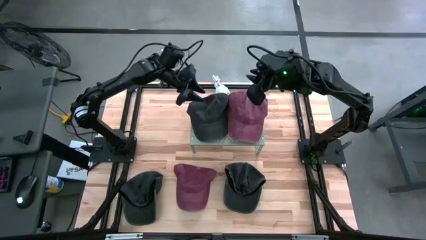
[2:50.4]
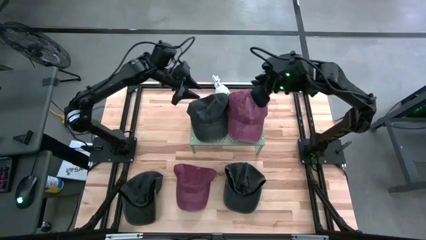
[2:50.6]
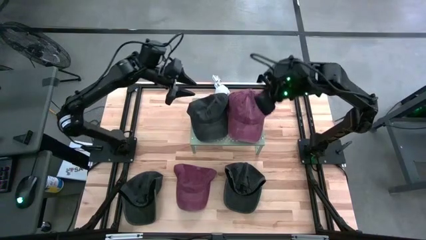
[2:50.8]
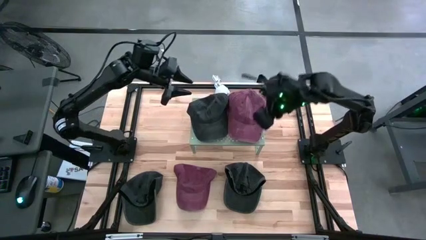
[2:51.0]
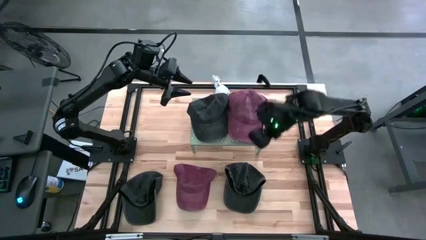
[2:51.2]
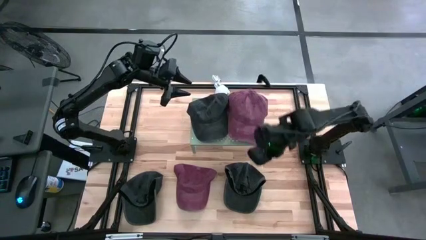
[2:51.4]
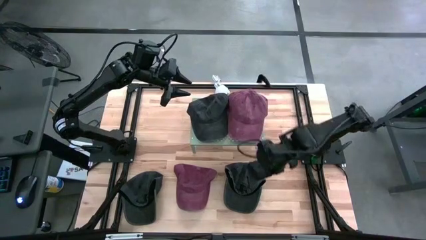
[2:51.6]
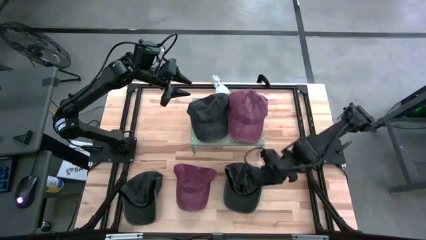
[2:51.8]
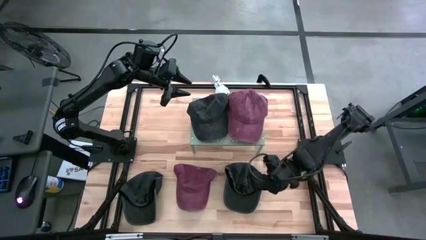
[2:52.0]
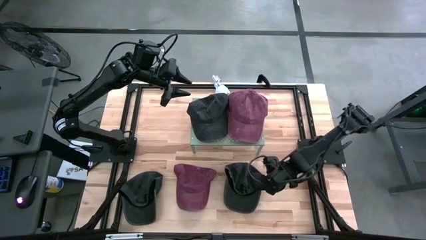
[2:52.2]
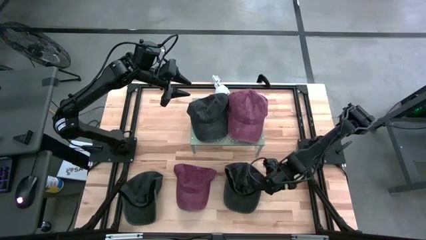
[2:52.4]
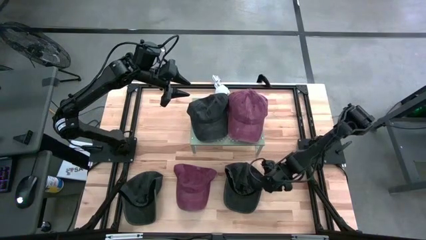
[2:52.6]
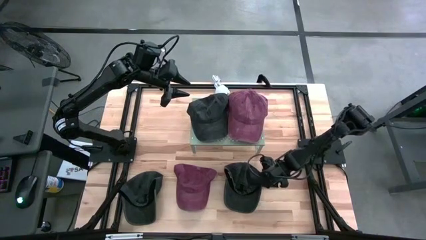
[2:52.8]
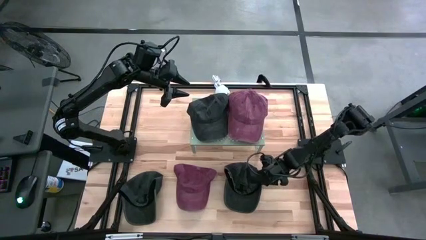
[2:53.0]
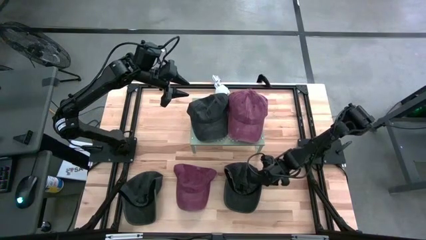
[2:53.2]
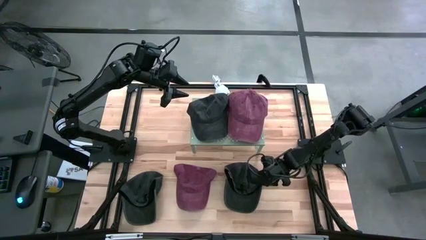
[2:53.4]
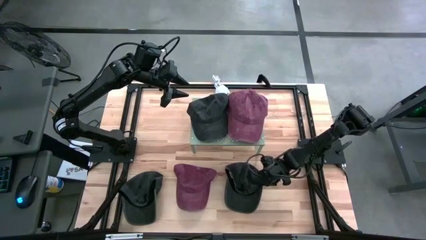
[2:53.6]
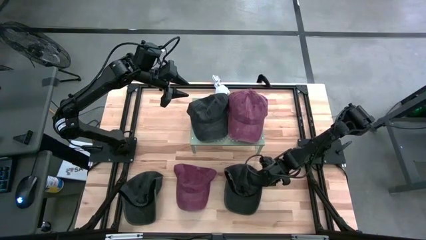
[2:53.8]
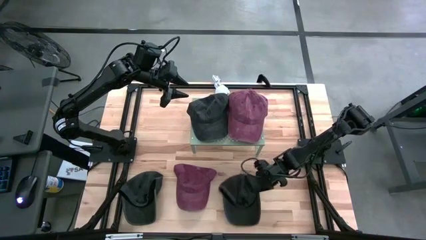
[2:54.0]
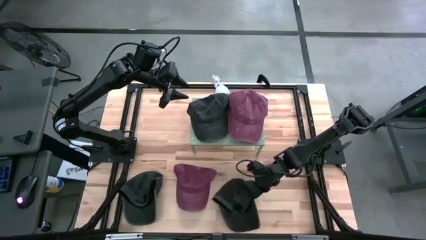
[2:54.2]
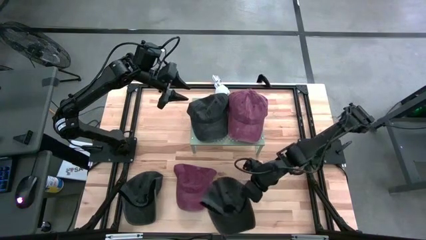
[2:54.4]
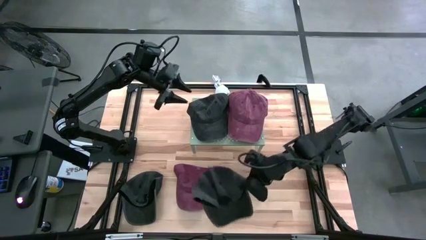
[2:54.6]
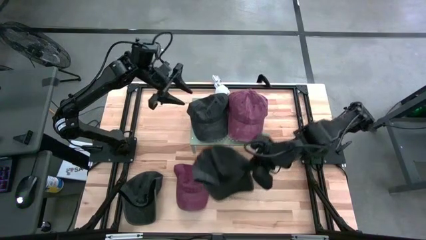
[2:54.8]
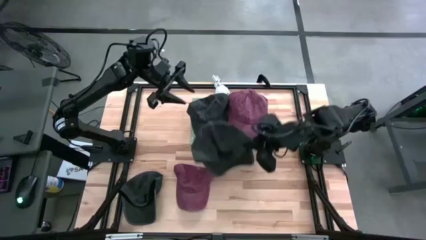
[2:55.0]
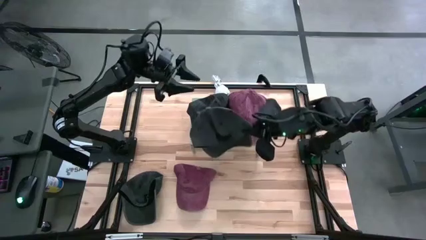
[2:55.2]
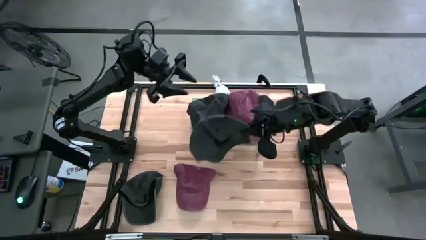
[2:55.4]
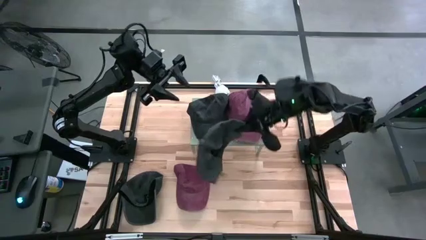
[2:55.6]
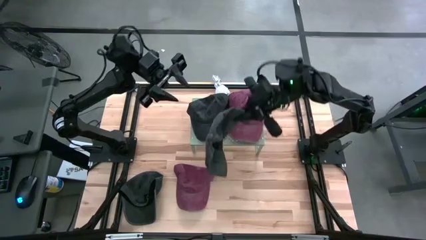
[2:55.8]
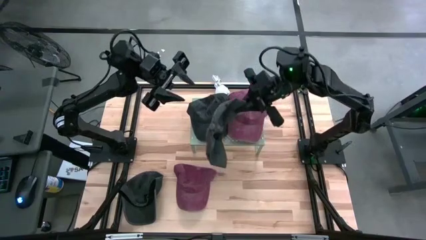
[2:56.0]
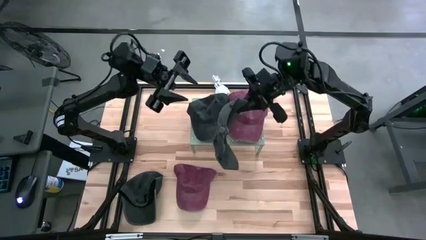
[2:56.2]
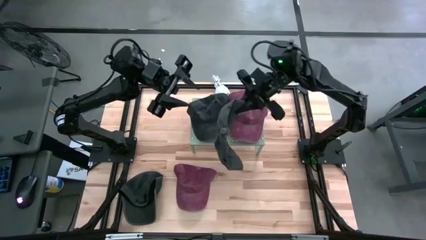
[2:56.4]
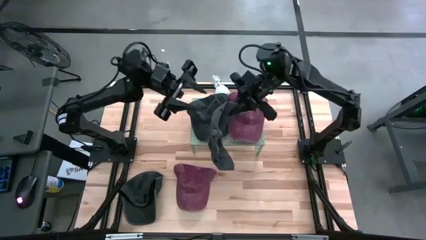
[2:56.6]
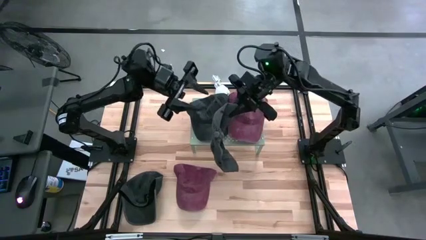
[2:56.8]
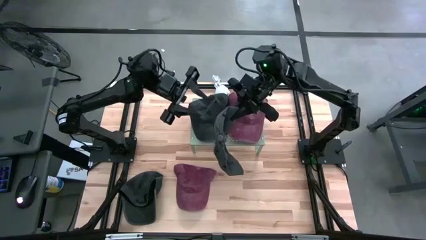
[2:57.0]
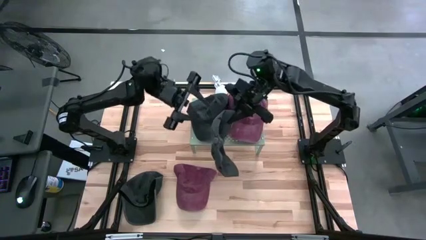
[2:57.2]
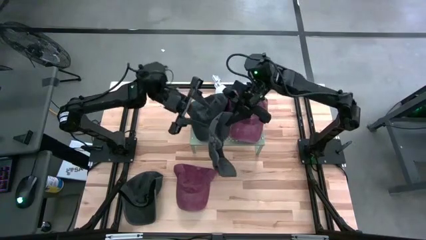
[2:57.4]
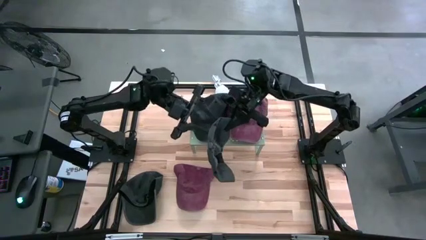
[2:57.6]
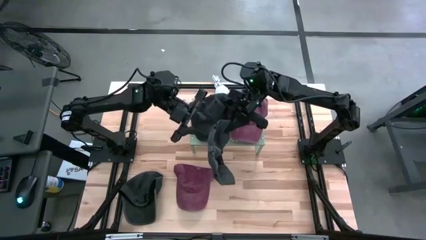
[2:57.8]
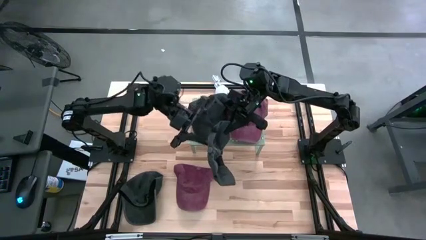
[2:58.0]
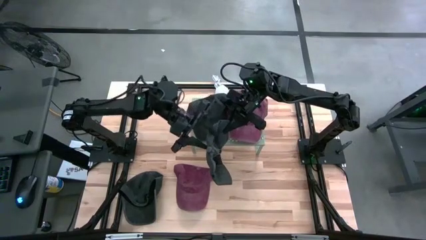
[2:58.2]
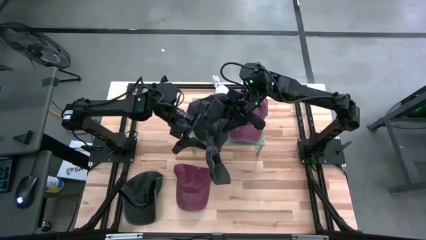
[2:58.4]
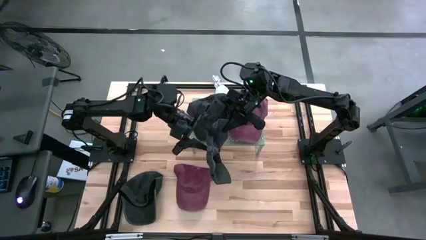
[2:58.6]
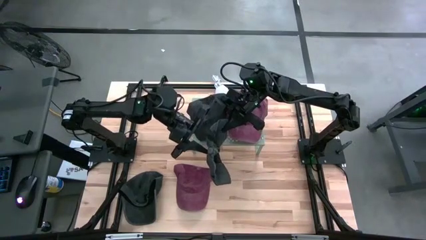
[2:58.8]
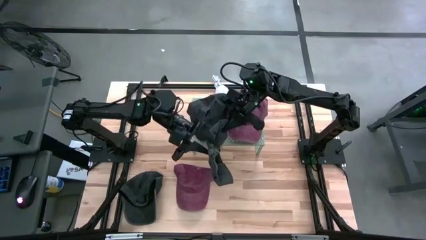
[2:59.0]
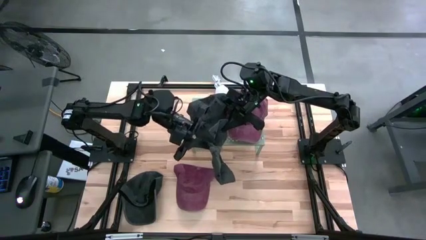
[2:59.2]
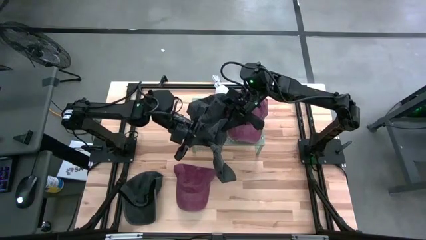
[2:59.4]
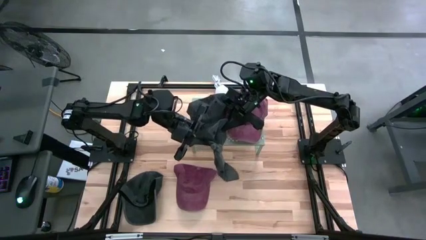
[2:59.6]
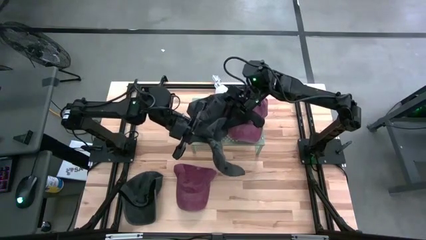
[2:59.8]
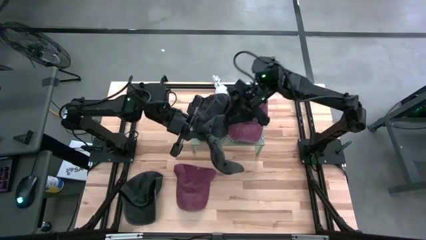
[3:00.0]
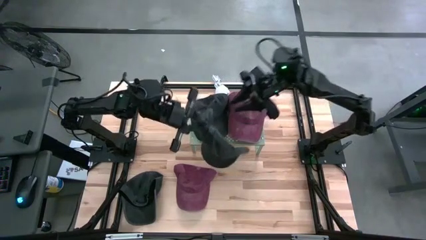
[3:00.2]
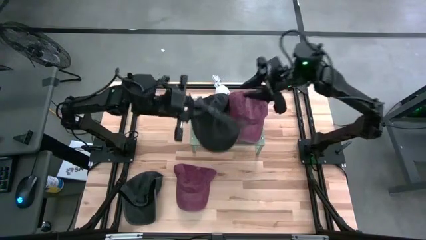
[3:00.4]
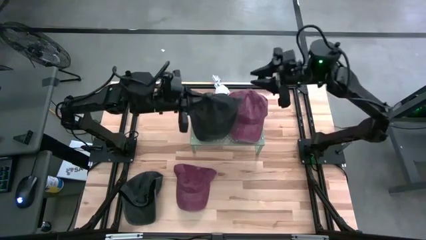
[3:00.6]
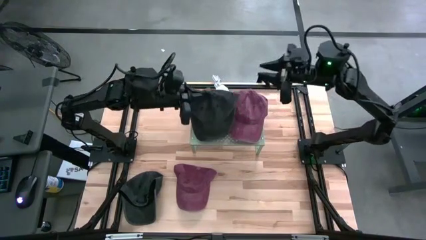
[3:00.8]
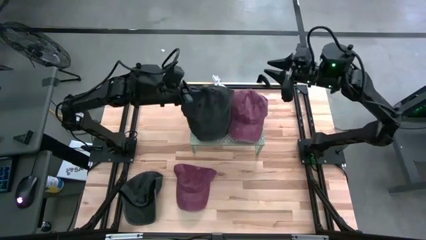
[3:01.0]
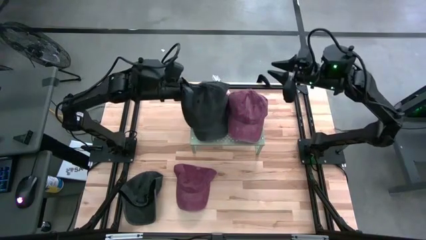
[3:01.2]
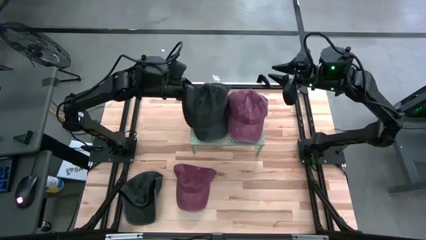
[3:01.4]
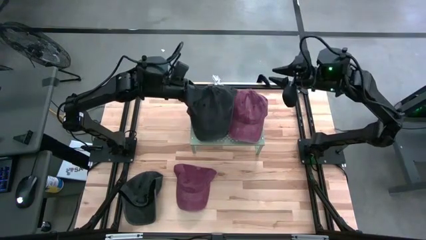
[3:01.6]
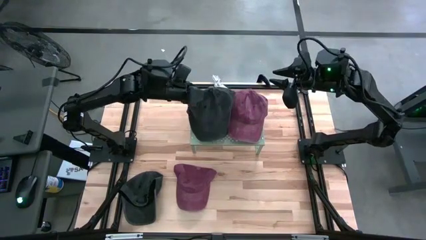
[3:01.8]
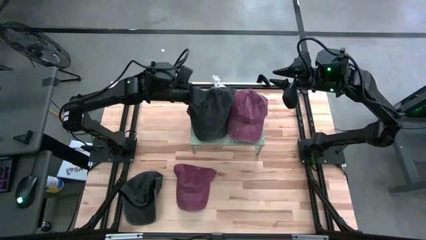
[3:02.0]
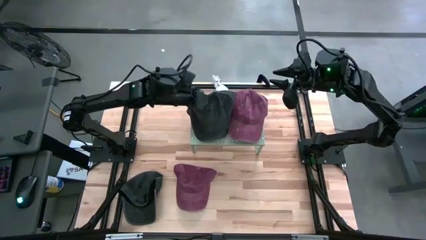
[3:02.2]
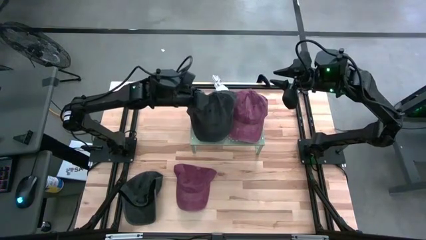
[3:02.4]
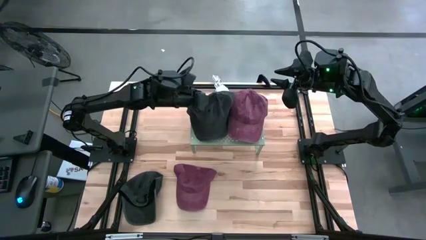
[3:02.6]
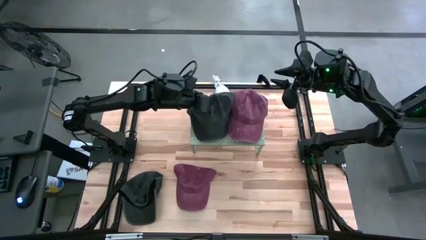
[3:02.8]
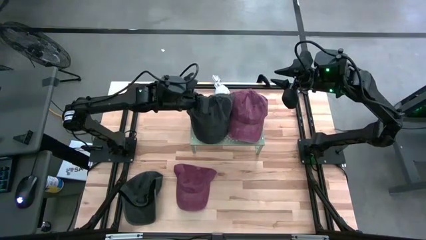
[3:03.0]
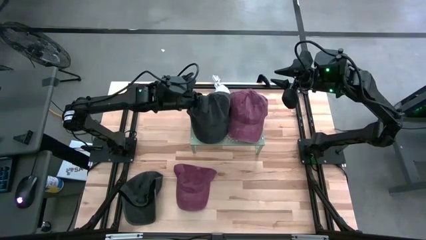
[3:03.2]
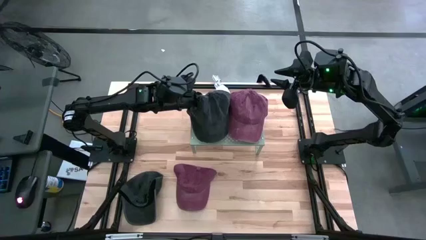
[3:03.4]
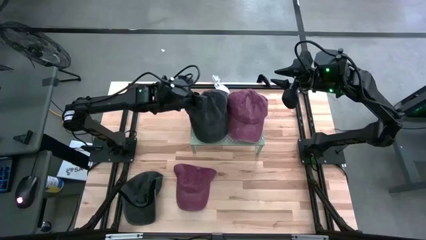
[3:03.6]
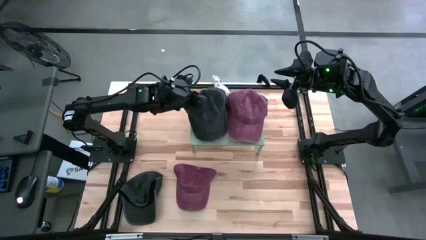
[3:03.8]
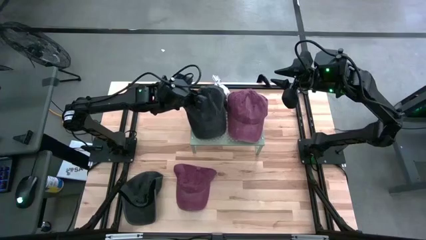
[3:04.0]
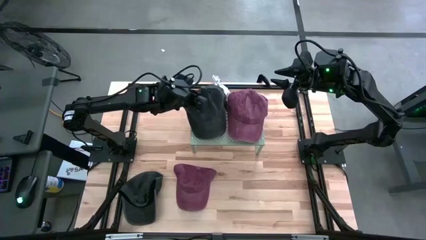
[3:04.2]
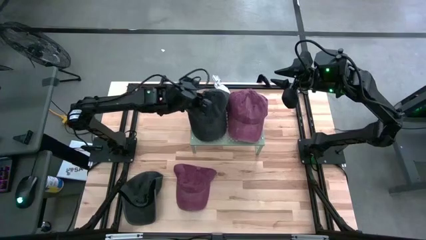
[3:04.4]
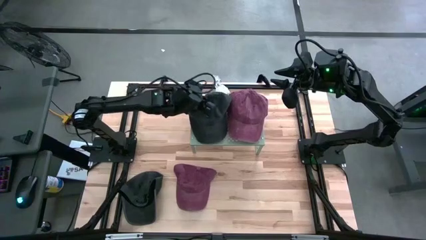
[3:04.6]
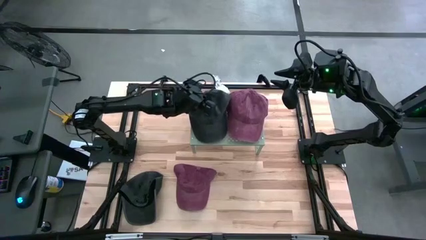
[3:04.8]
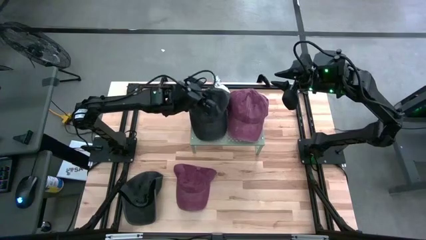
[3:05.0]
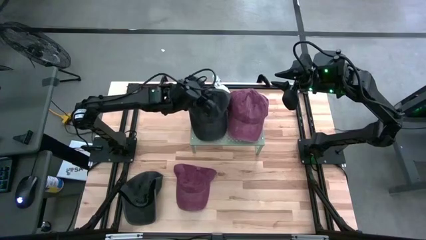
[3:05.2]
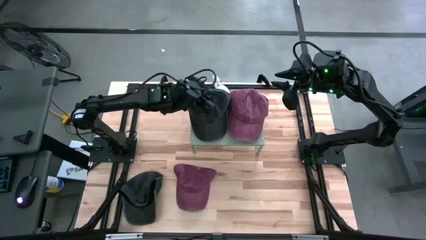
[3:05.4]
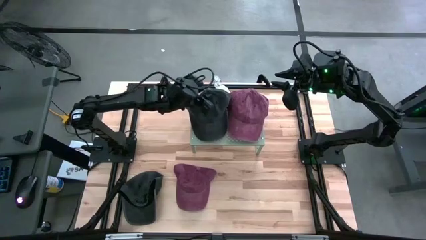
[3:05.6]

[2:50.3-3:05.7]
Task: Pick & Place hat
Stack the right black cap on top of the black cap on the shelf

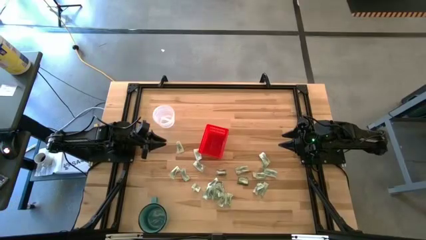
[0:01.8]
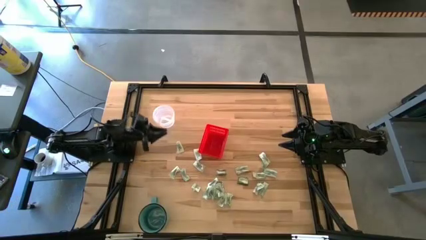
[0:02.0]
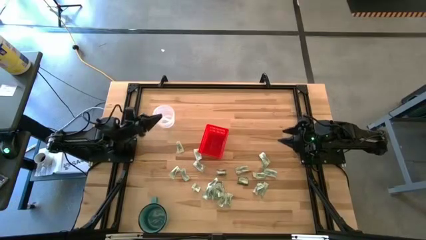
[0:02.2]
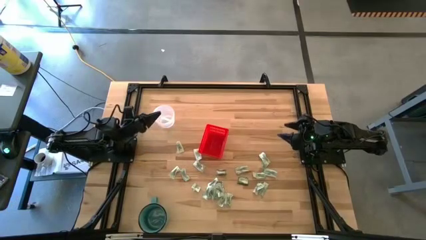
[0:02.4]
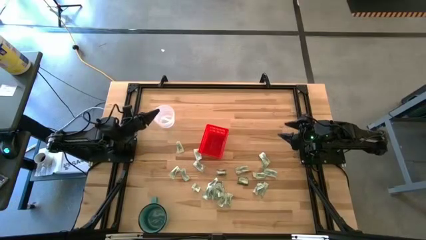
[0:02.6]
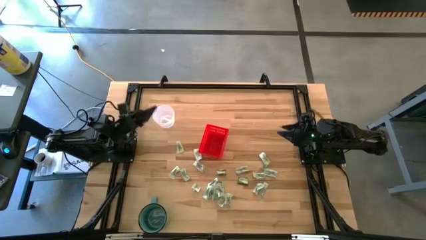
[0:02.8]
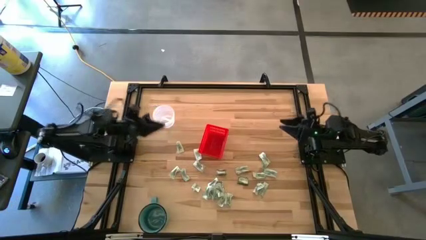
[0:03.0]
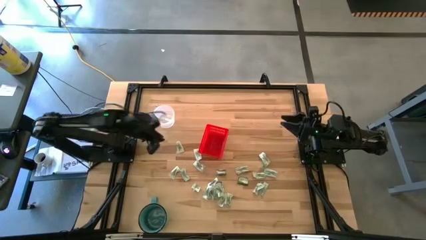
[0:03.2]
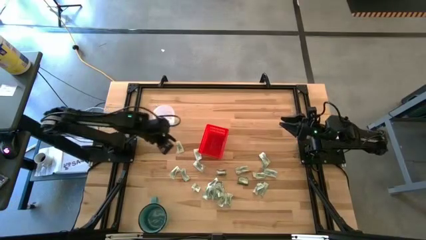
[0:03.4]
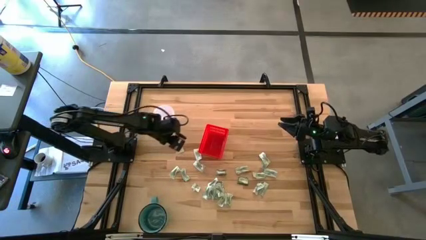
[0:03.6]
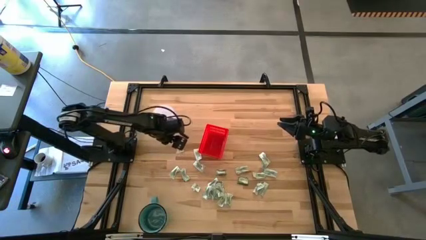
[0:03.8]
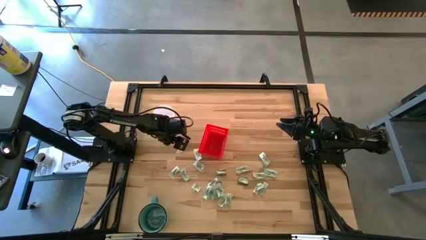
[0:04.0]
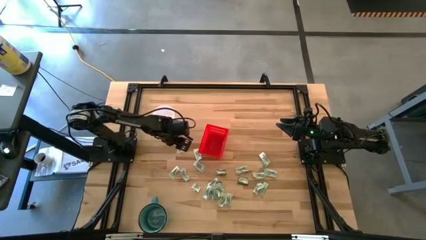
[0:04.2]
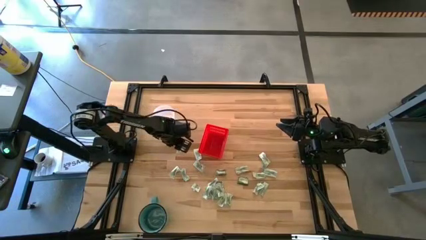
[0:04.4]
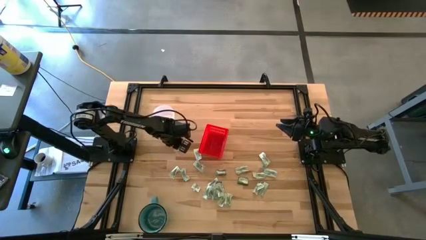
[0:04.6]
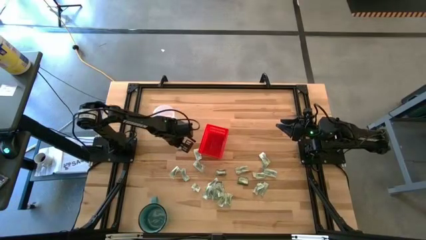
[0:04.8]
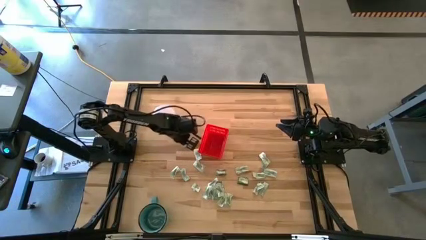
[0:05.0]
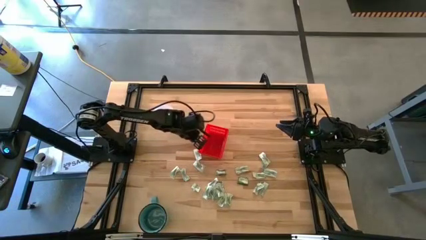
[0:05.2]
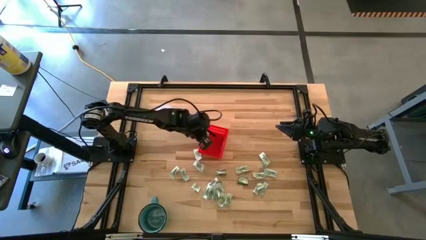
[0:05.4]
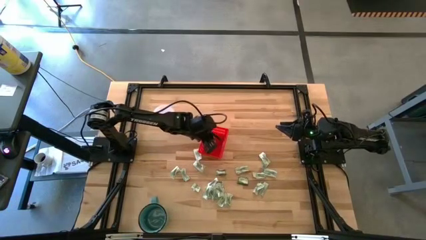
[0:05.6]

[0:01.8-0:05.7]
Task: Pick and place Stevia / Truvia into bins
Put the stevia packet into the red basket
